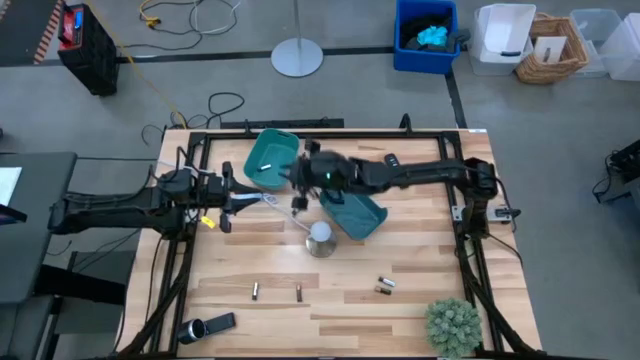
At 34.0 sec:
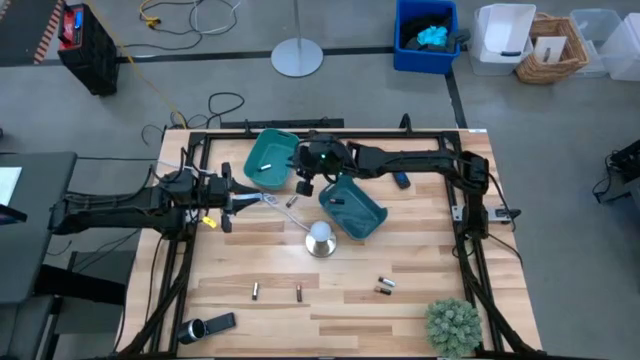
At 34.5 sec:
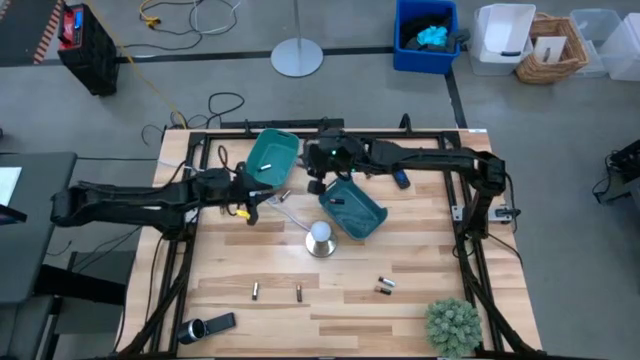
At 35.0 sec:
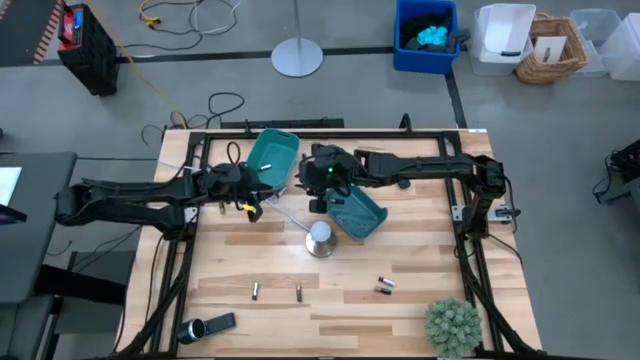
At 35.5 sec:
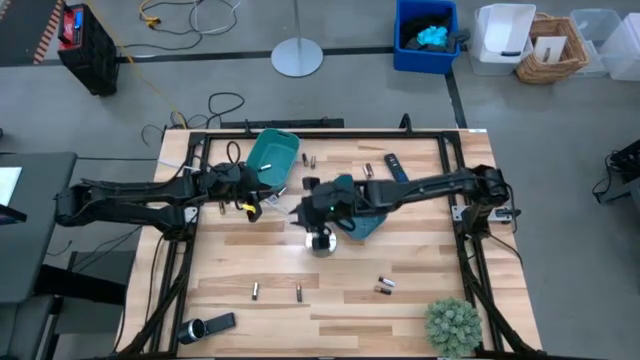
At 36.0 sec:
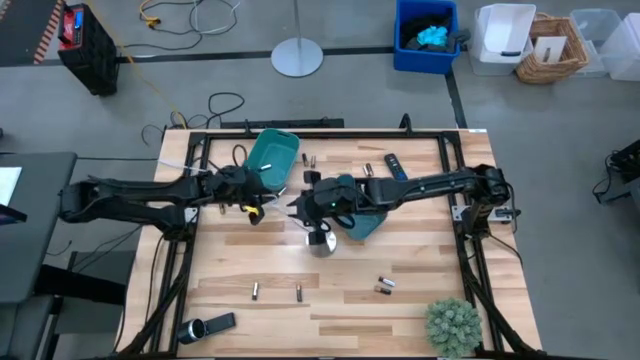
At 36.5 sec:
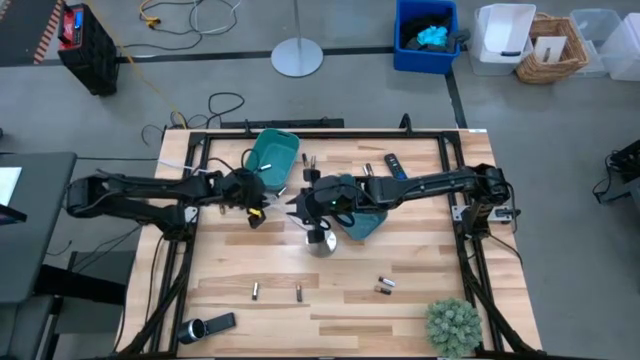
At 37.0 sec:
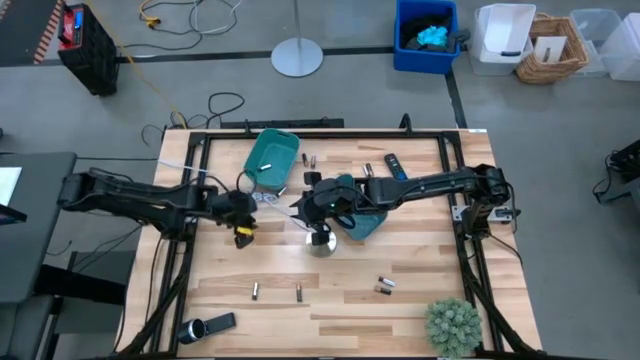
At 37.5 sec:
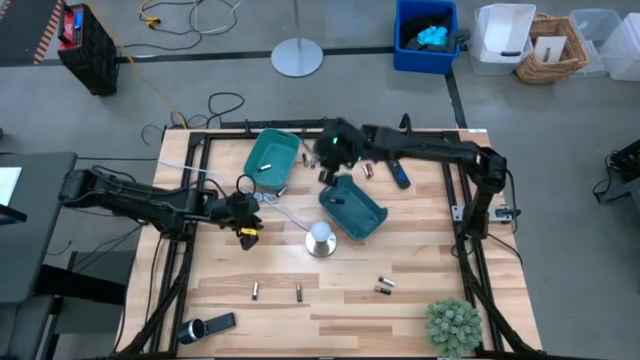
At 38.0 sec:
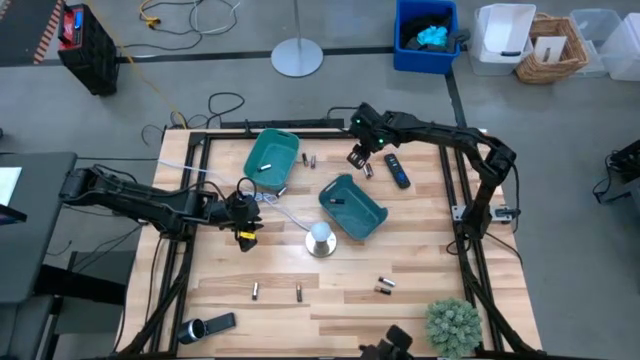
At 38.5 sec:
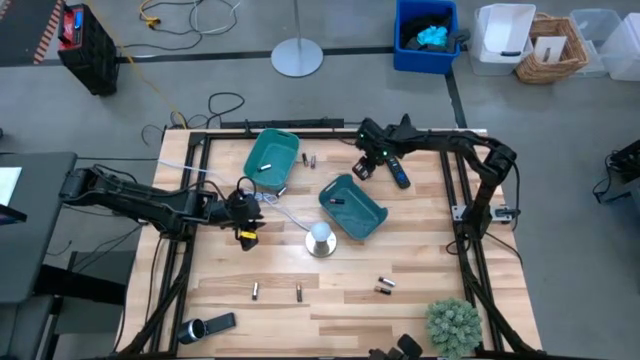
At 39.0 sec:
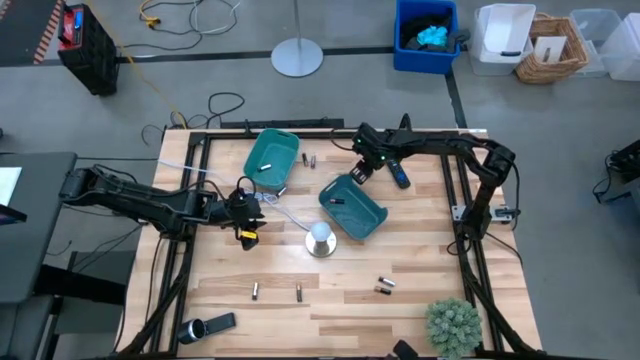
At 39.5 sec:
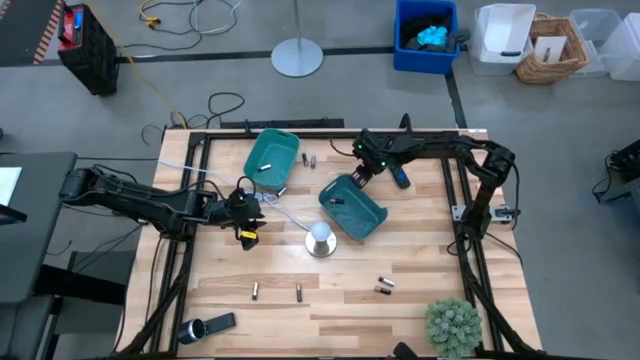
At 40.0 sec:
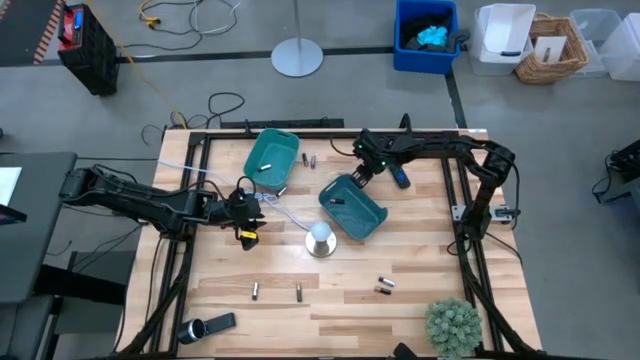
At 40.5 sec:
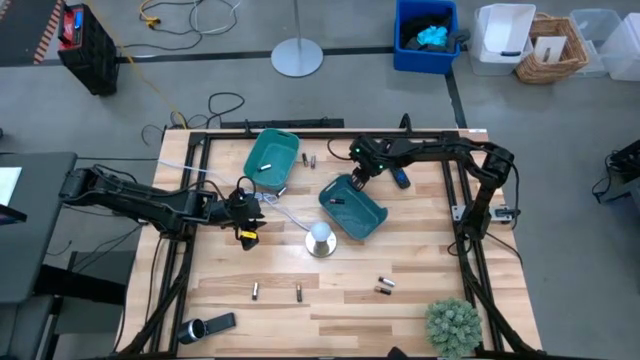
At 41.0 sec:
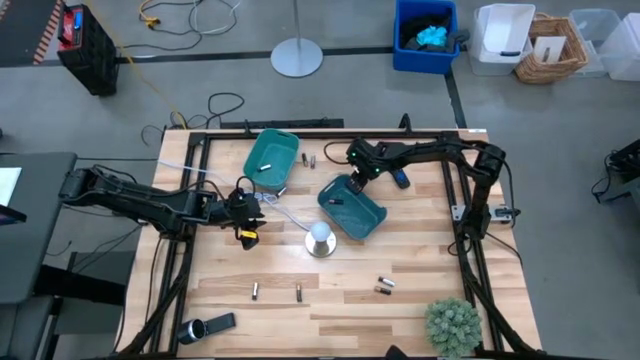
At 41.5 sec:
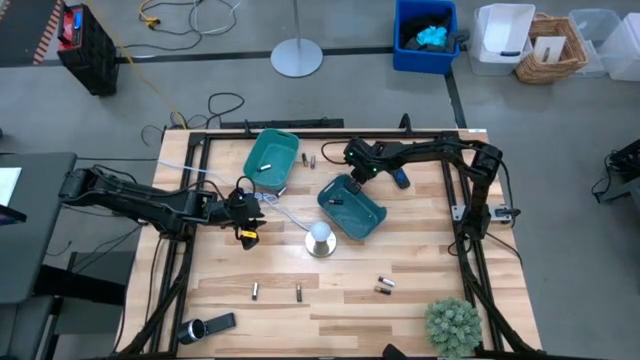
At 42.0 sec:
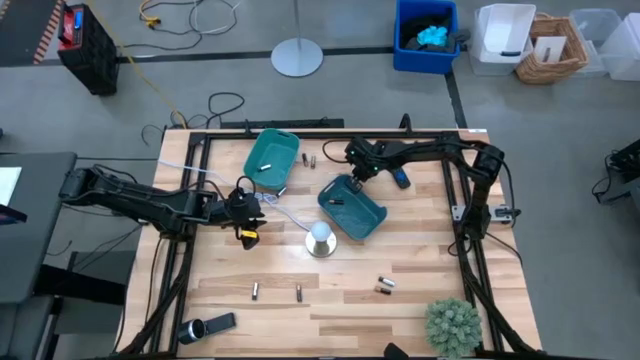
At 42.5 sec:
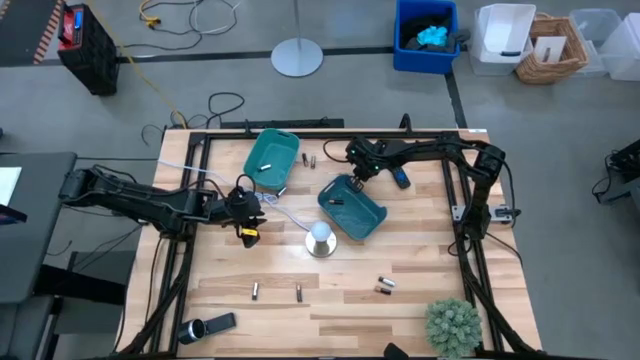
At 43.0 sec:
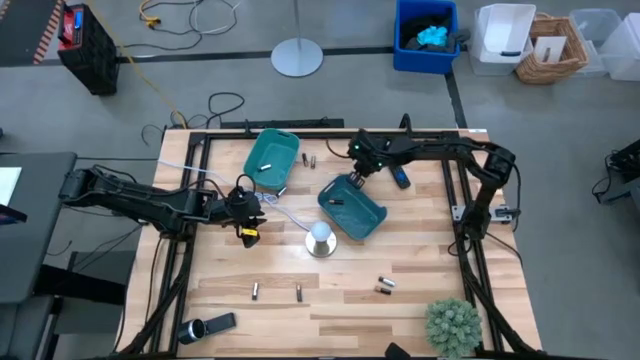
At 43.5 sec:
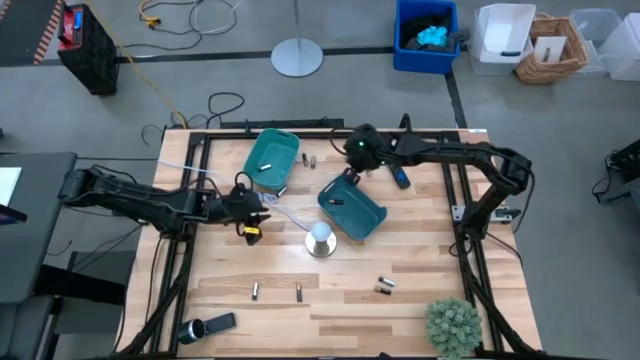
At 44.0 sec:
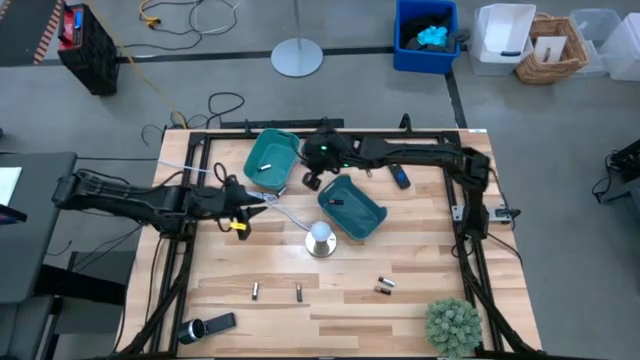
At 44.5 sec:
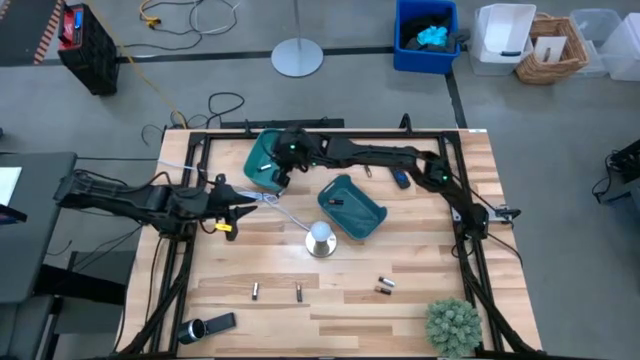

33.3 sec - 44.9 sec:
Task: Sort batteries
Put the silver battery into the green bin

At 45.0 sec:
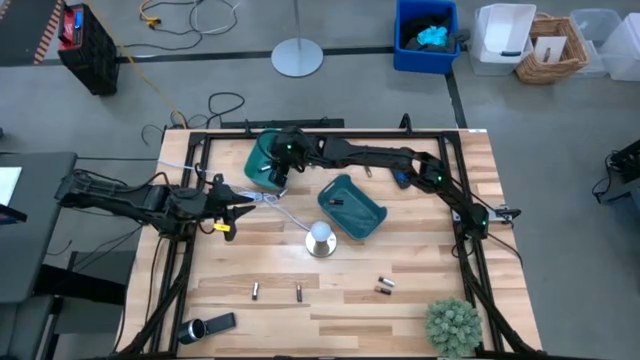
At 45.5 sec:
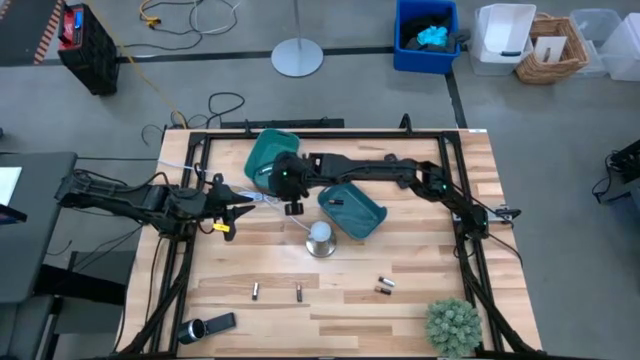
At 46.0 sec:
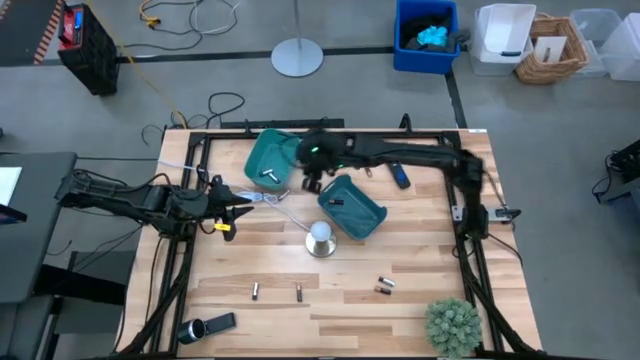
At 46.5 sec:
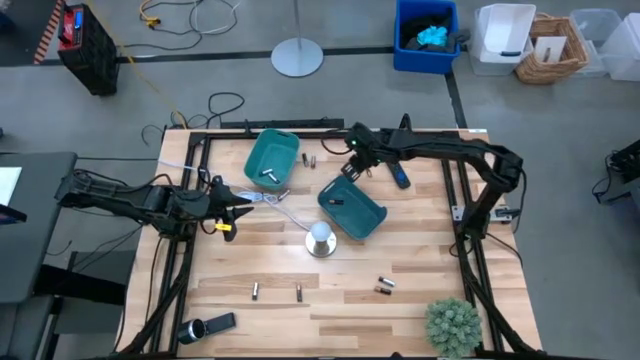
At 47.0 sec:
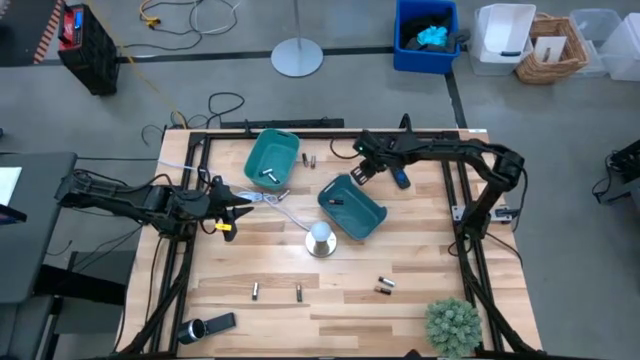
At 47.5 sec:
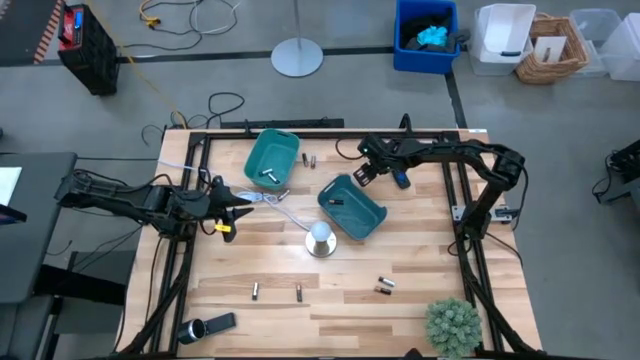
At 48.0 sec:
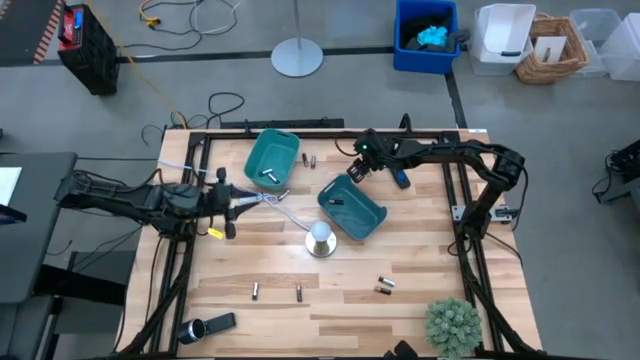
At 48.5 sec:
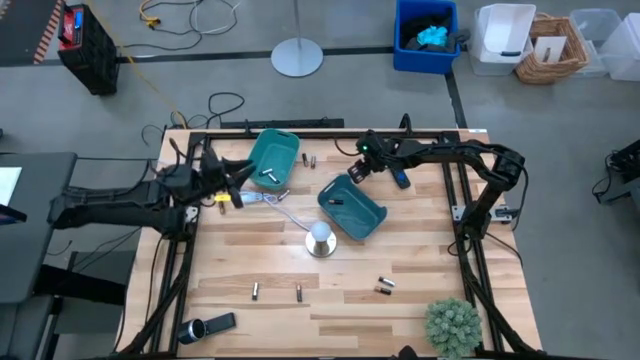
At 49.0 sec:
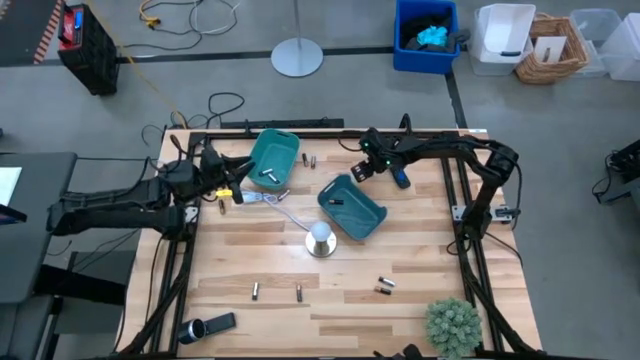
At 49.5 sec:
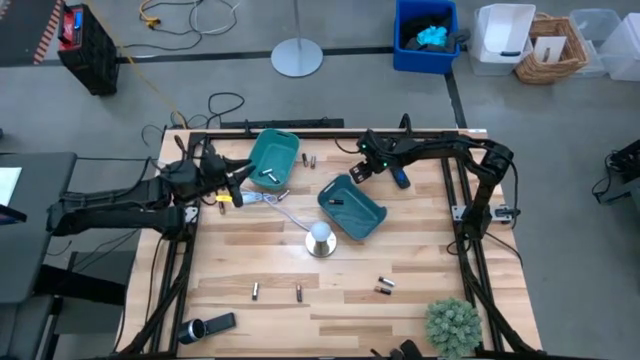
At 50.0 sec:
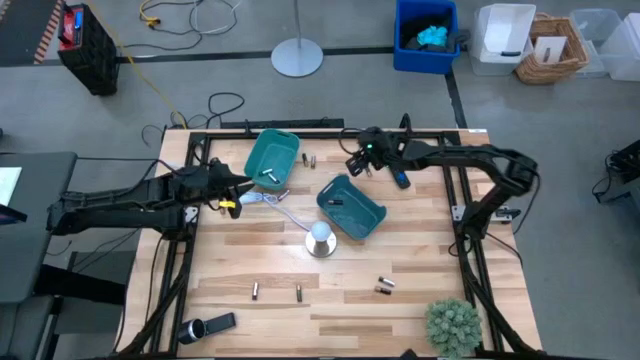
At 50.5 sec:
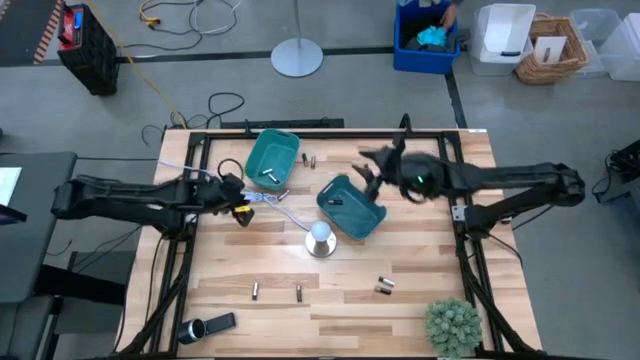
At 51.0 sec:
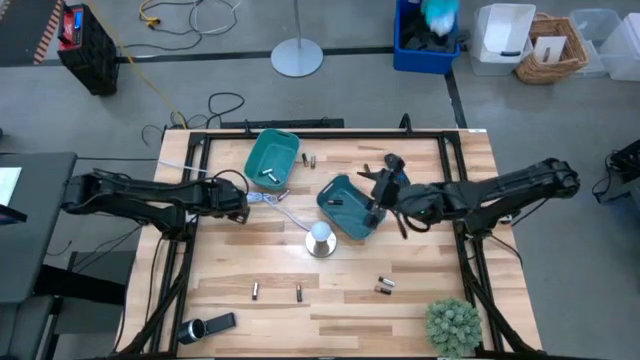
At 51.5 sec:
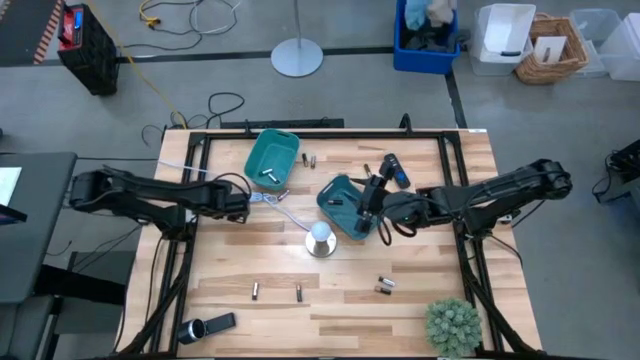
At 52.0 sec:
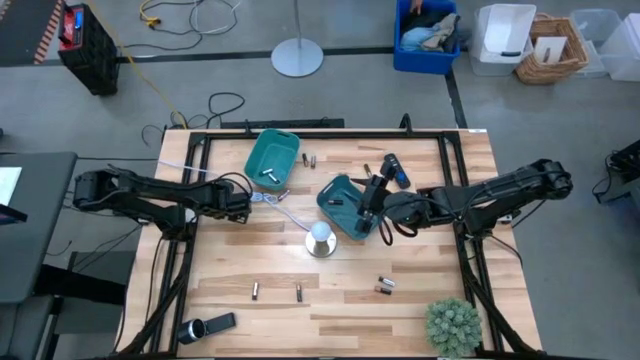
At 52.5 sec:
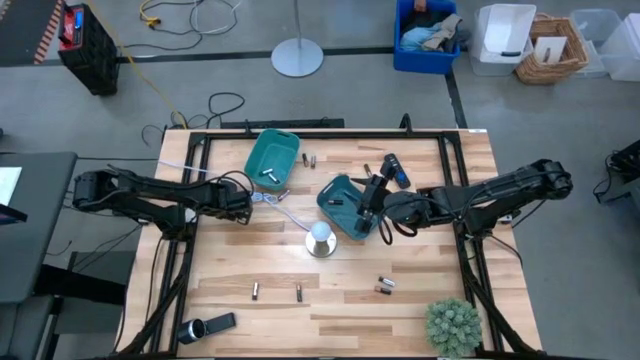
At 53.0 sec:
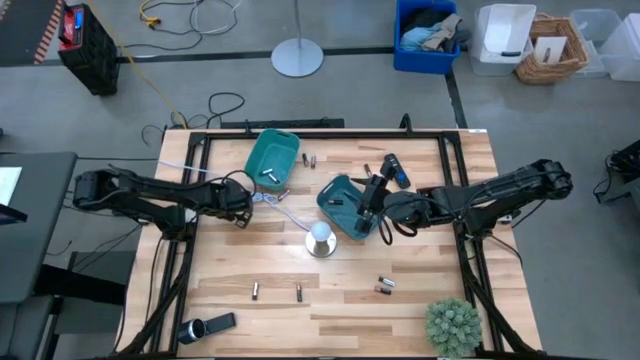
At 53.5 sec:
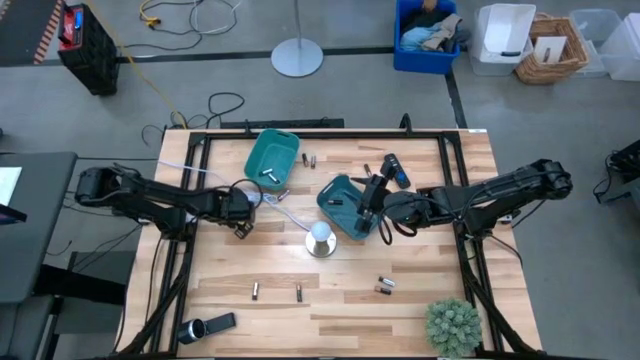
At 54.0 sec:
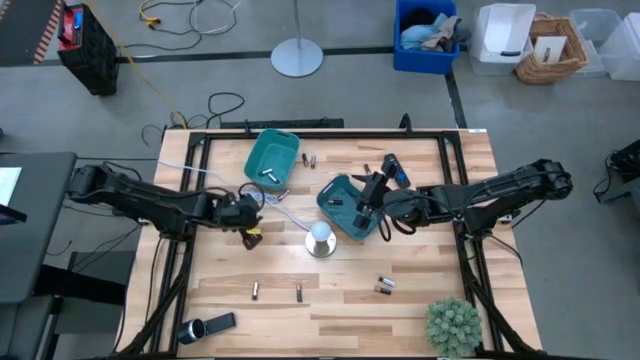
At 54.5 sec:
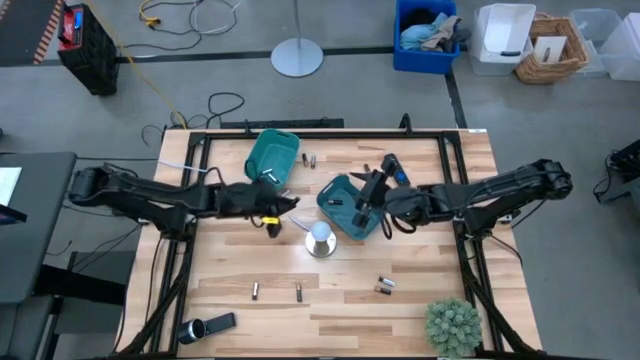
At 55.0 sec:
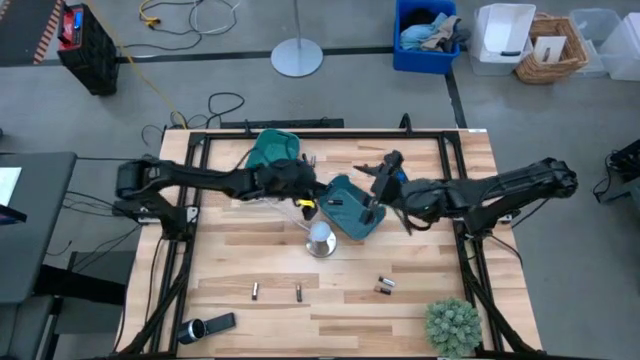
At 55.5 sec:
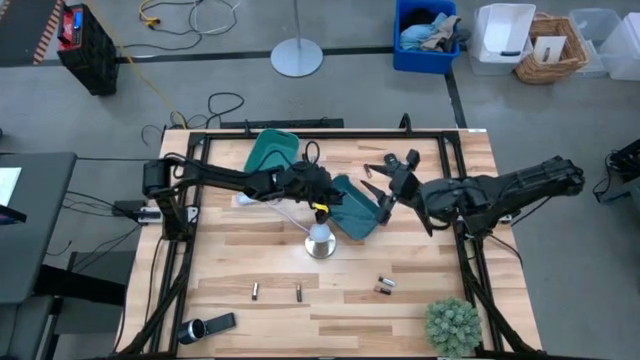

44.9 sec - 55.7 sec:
Put the black battery into the blue bin
